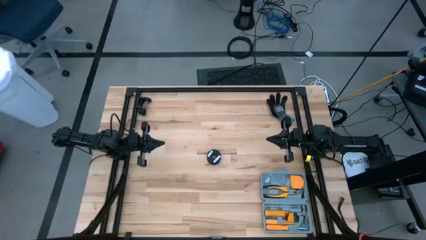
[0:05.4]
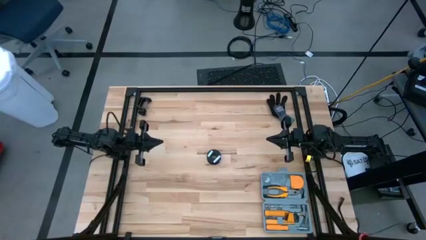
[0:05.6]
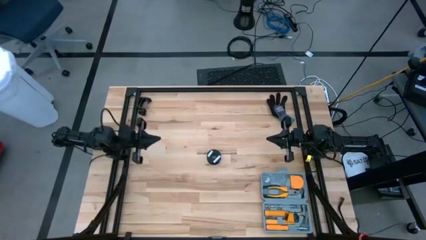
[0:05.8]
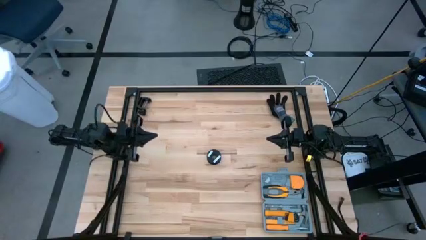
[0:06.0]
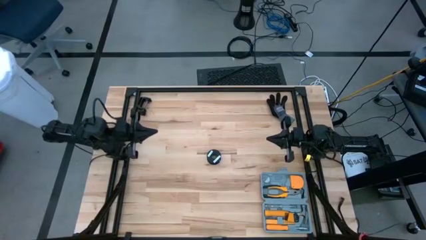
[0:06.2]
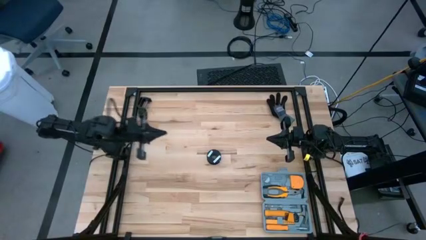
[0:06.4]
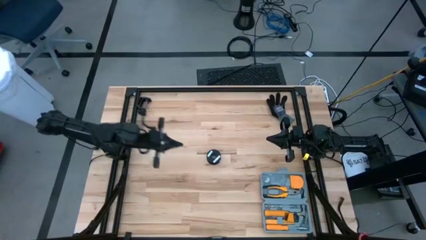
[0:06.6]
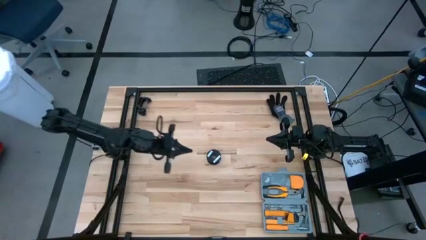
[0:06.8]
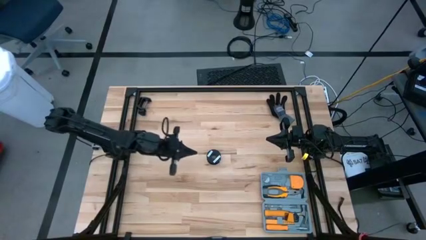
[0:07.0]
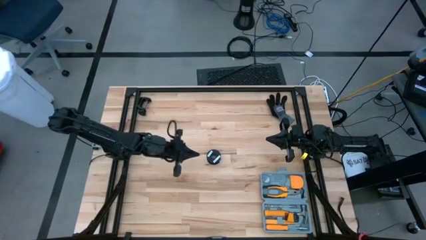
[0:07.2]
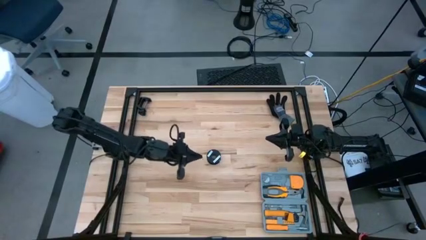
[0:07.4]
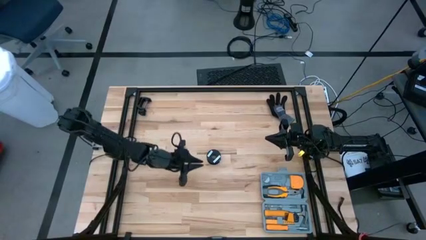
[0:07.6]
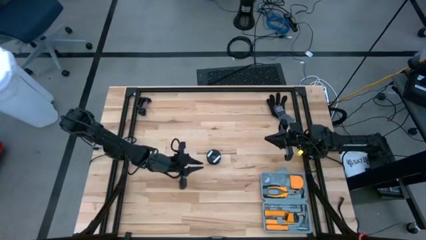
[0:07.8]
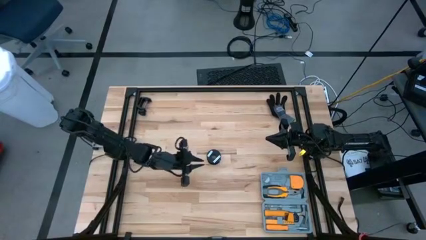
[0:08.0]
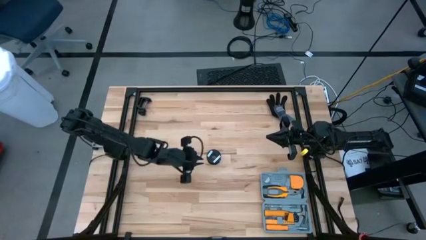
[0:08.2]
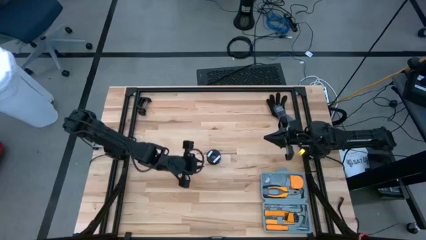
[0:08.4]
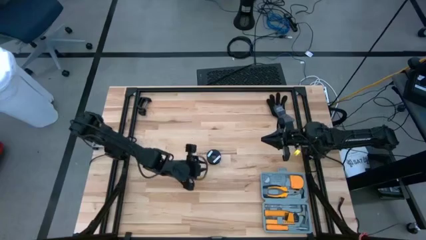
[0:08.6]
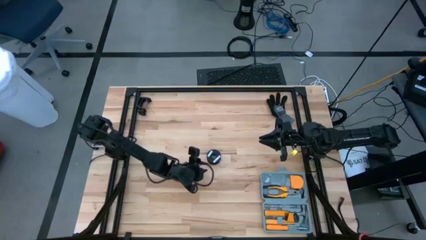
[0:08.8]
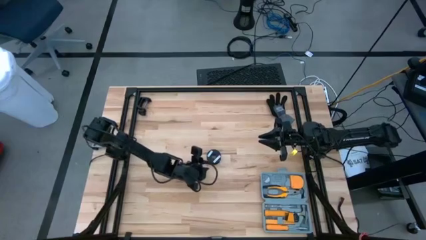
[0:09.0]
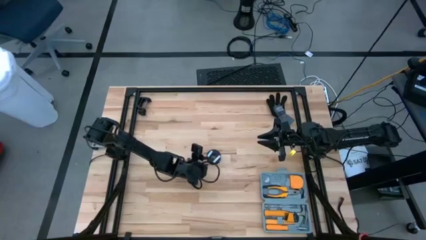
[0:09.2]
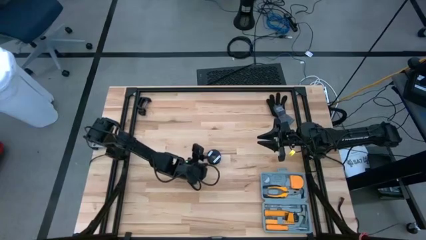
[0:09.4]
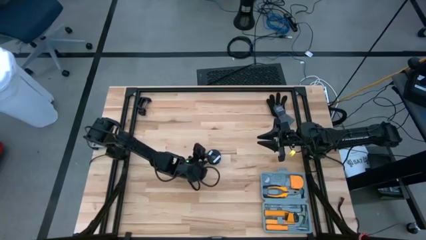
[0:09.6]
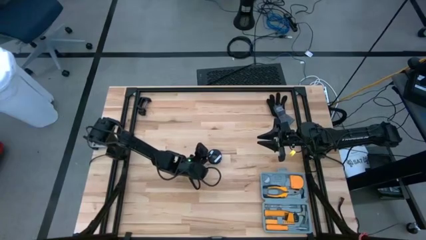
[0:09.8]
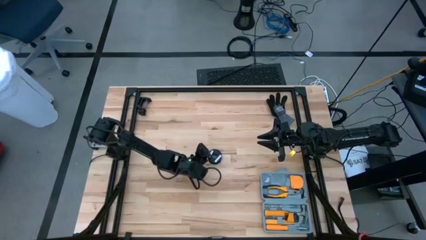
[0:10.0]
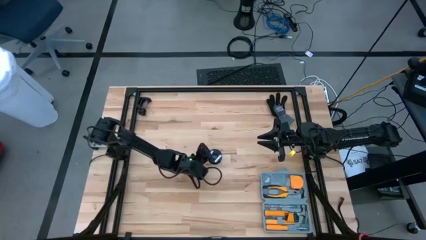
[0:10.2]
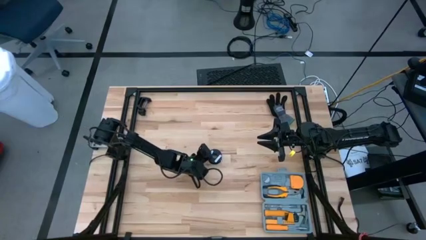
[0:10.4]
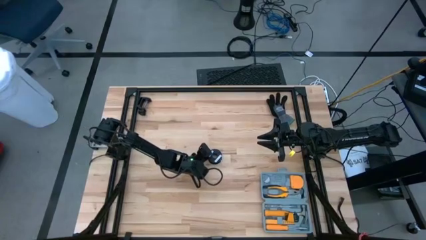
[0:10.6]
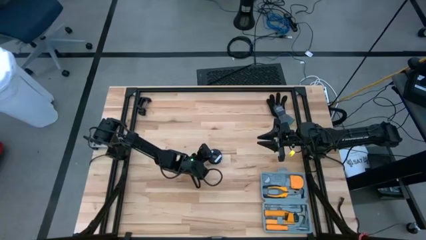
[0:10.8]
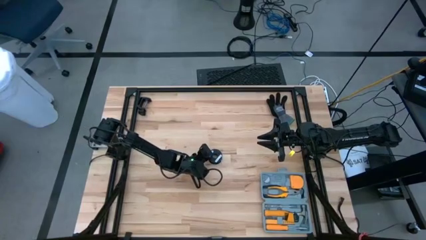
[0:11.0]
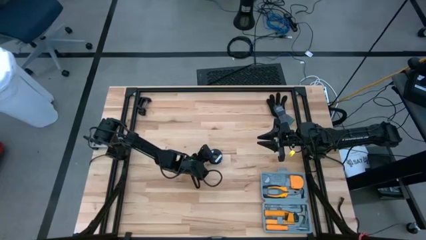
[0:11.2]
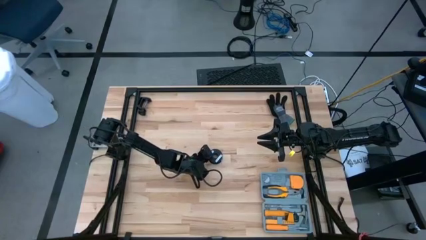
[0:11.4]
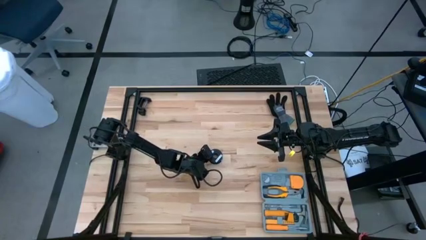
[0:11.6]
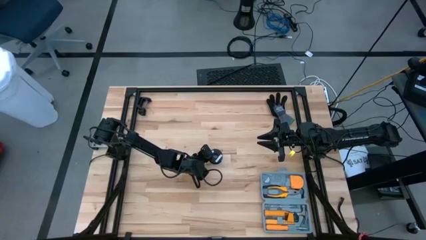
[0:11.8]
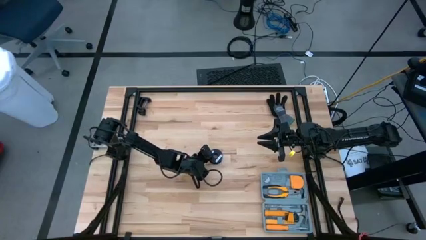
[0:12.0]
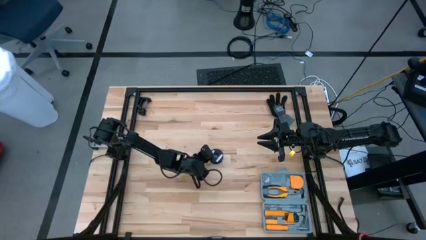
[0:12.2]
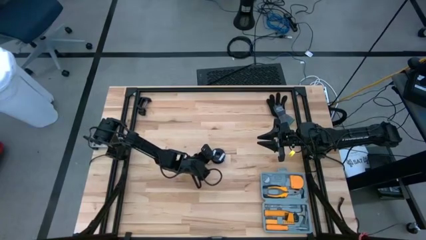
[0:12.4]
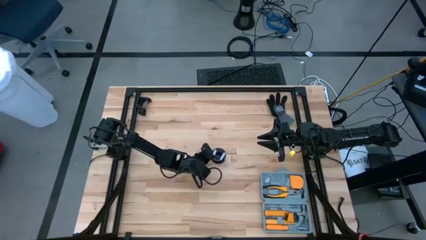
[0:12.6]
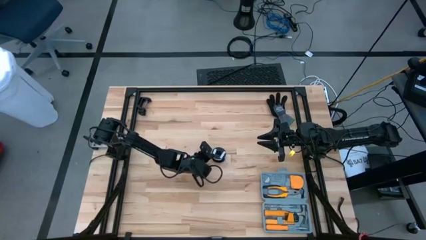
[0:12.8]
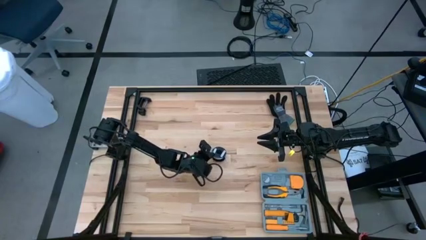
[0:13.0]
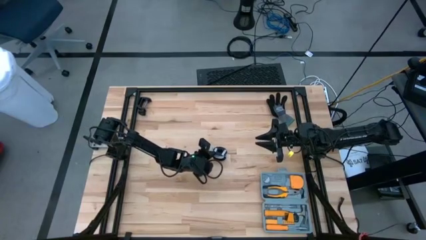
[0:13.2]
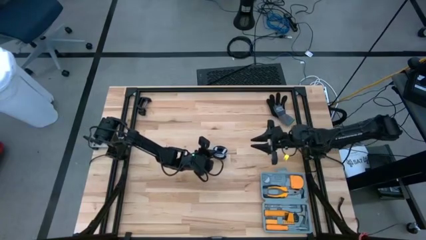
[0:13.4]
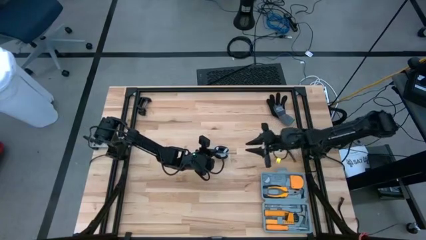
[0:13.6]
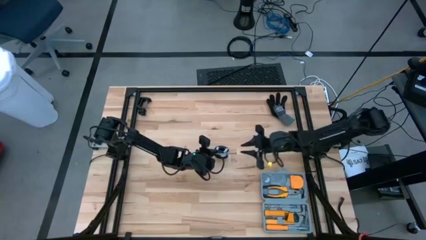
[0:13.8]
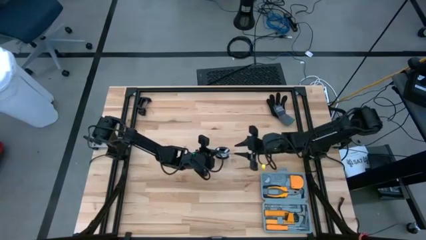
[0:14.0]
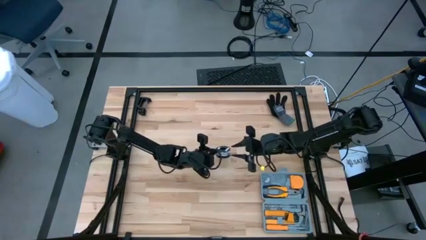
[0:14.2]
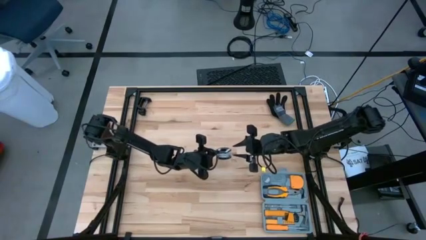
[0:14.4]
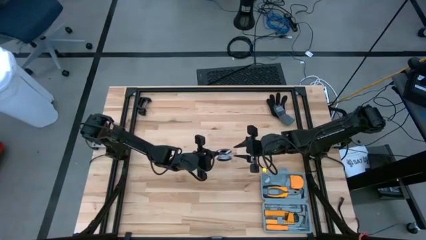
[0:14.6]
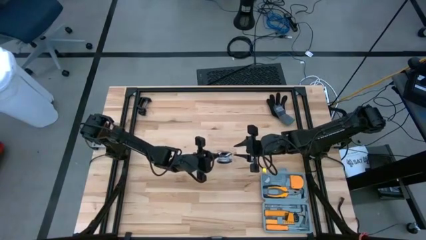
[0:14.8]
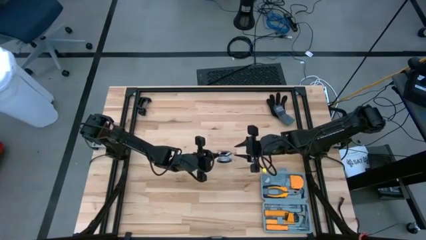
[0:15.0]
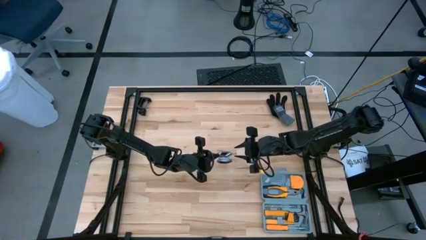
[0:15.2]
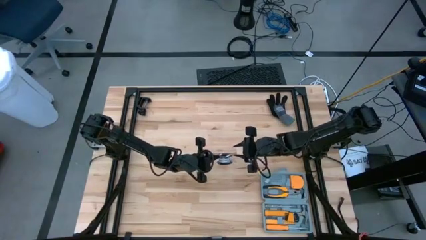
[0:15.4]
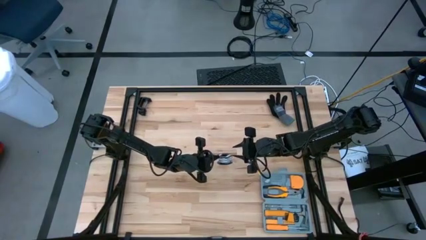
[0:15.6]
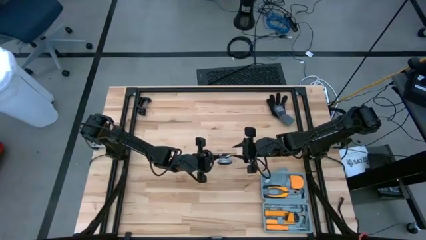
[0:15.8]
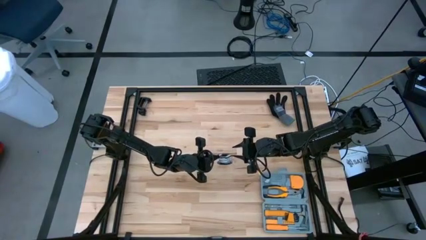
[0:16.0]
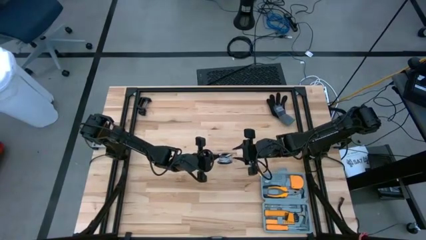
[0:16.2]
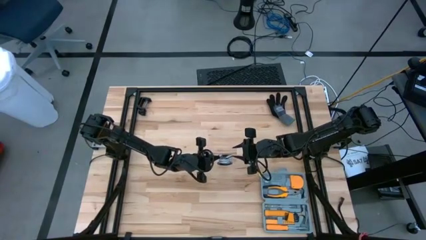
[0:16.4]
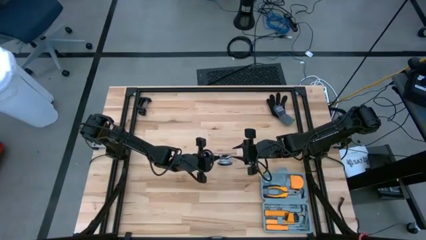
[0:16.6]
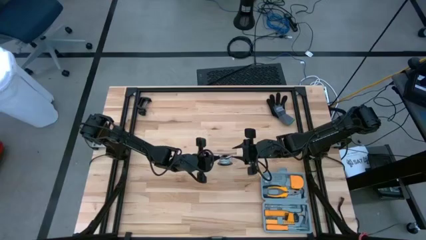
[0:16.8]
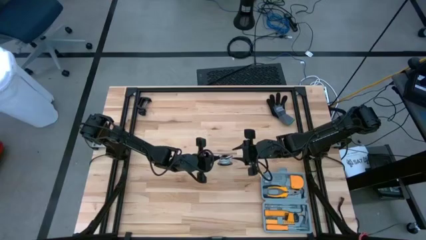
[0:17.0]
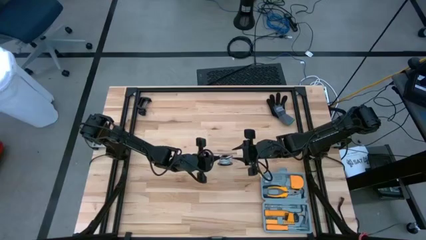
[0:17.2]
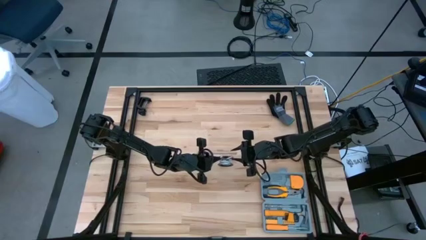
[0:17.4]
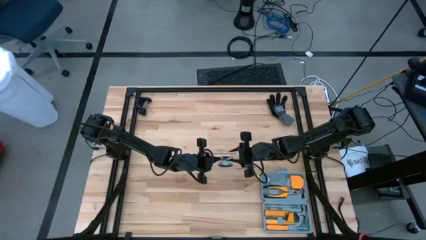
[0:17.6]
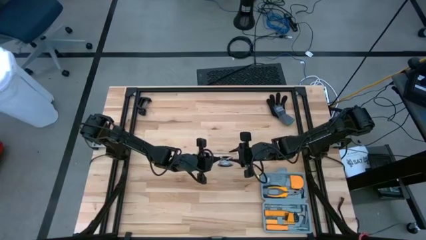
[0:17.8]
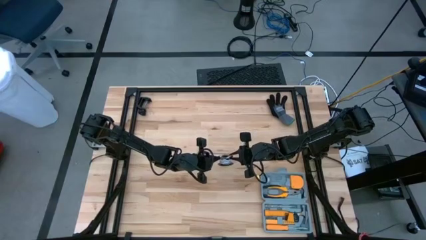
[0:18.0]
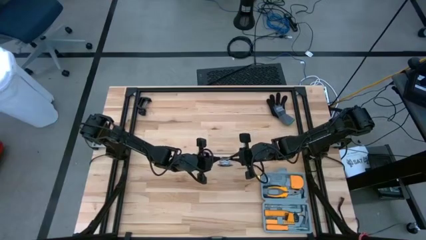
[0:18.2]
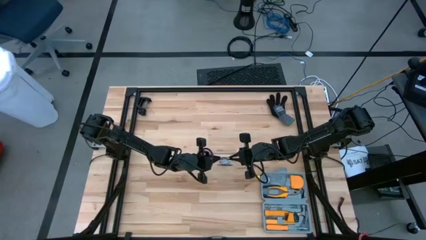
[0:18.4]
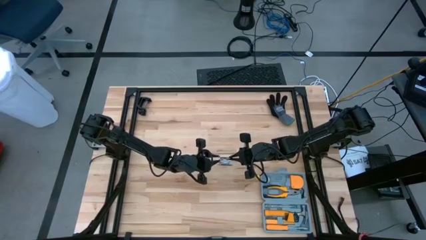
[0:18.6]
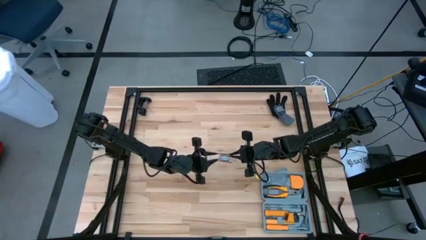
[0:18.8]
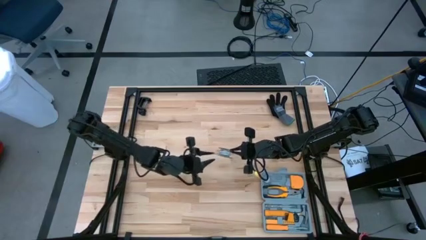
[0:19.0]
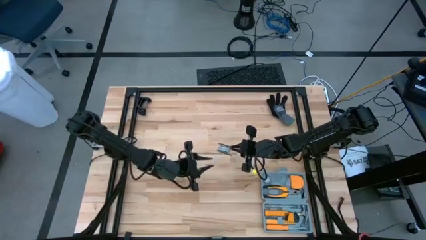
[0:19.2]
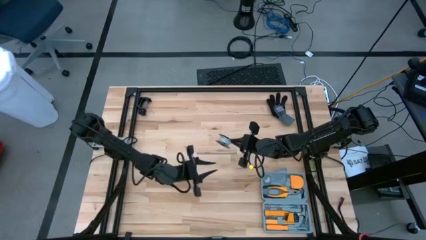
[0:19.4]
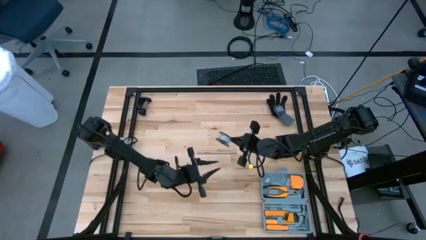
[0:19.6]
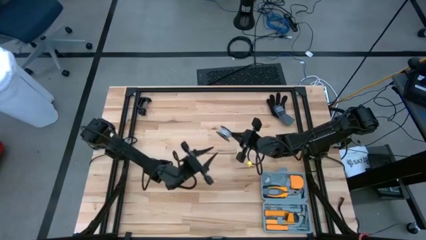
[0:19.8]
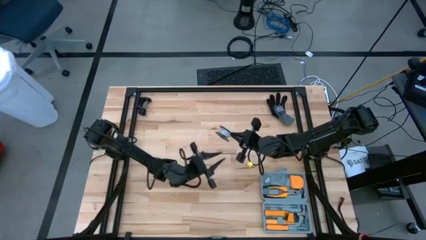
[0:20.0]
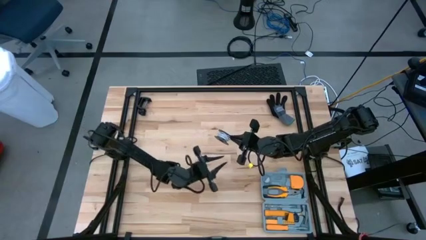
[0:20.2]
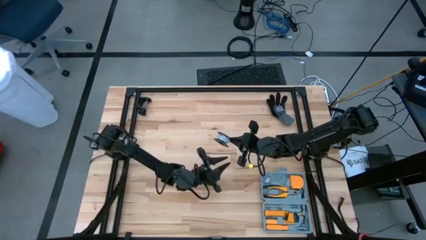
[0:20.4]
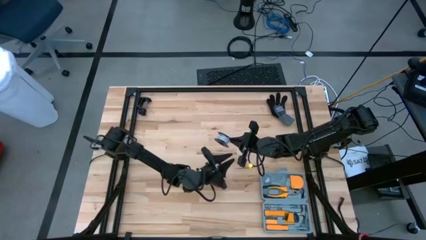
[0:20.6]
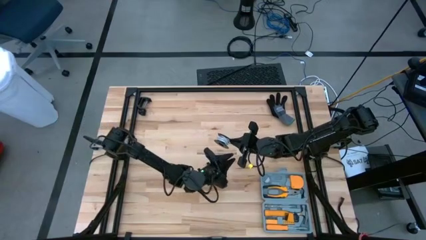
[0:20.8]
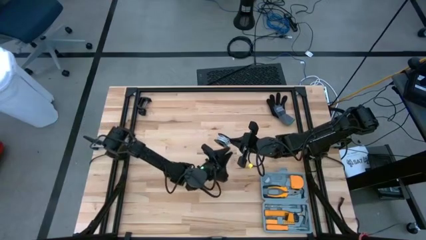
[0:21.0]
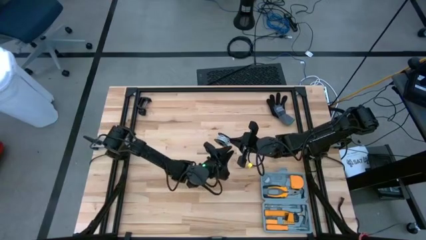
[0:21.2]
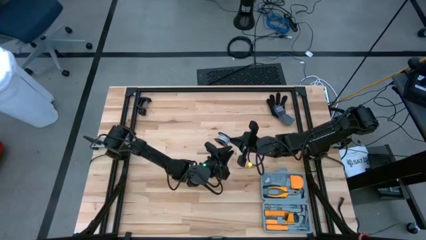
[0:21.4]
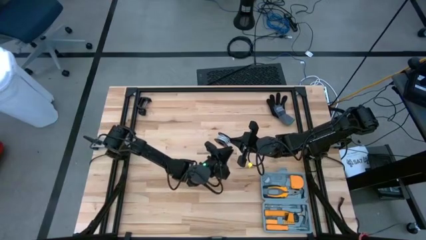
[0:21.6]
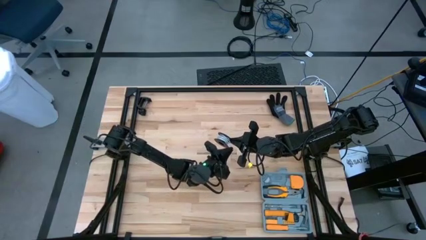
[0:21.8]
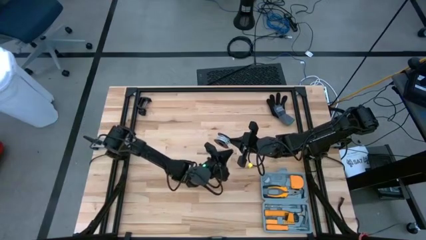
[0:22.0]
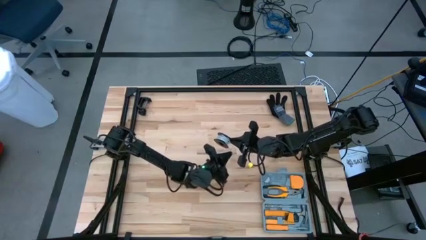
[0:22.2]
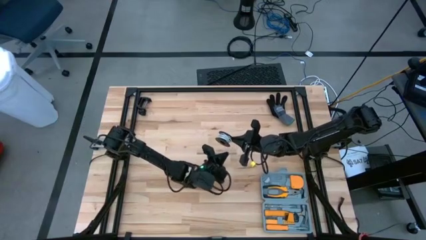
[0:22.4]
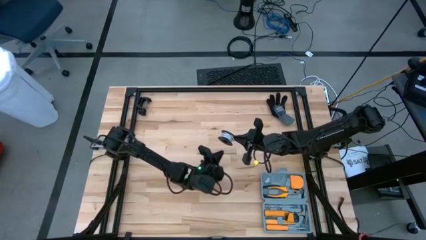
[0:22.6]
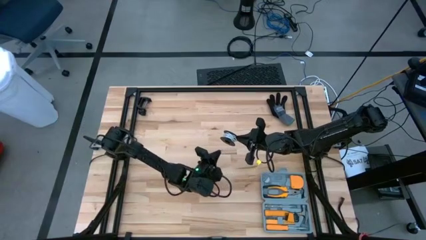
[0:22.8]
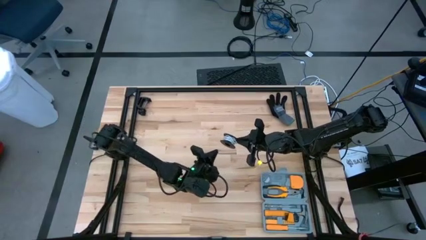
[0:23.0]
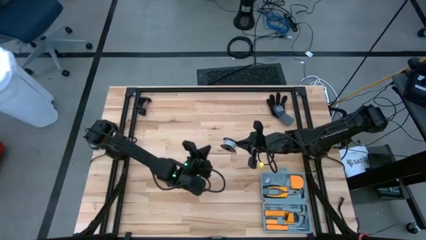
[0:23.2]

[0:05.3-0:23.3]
Task: Coil cords
Uncoil the white cable wire from the spool
